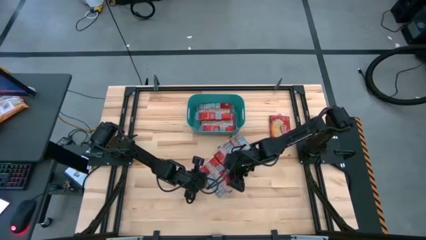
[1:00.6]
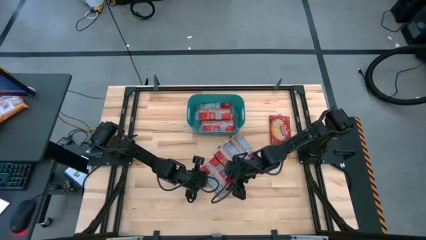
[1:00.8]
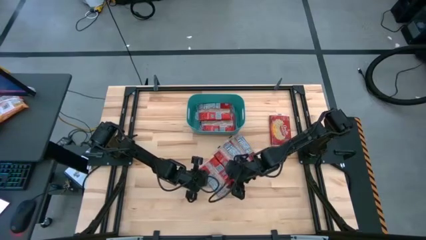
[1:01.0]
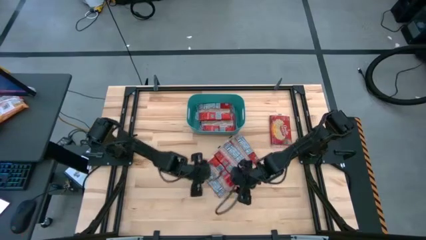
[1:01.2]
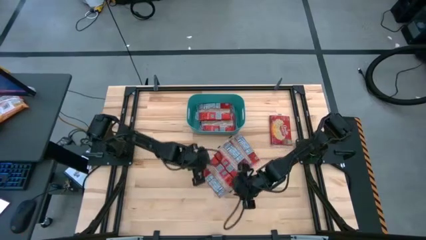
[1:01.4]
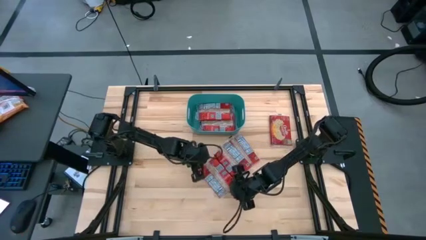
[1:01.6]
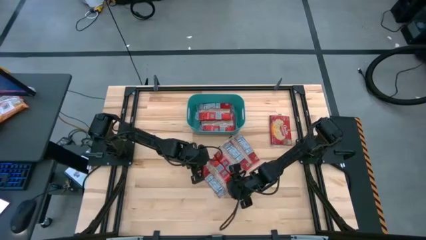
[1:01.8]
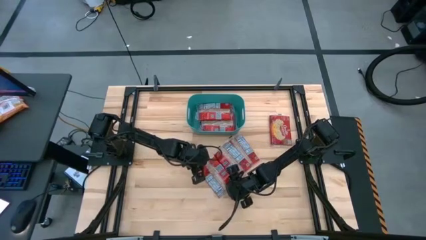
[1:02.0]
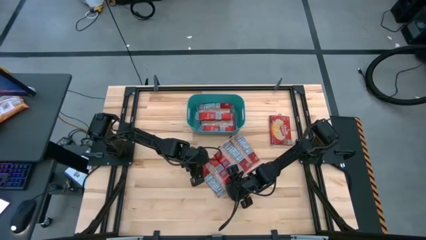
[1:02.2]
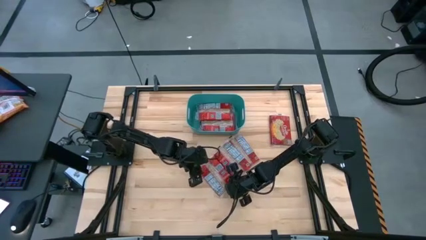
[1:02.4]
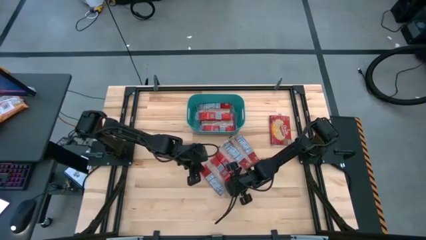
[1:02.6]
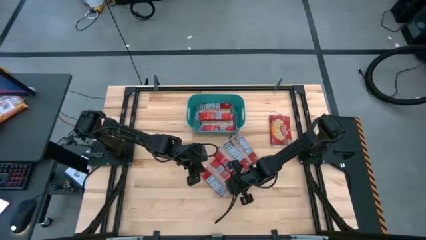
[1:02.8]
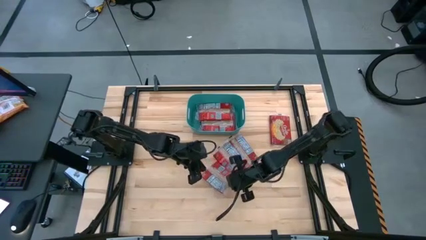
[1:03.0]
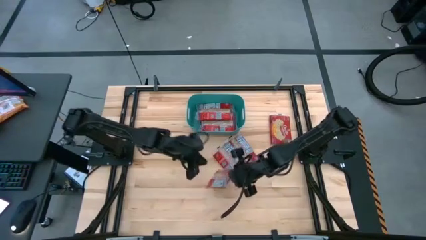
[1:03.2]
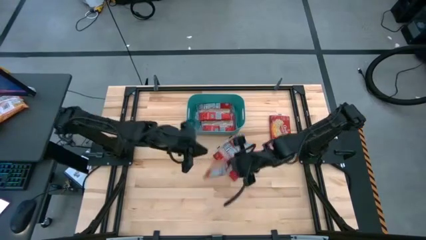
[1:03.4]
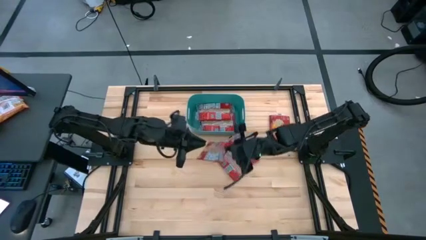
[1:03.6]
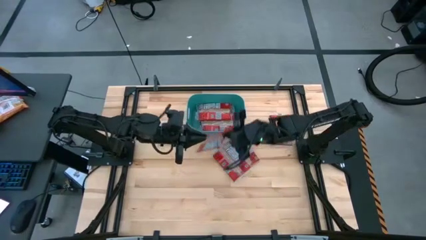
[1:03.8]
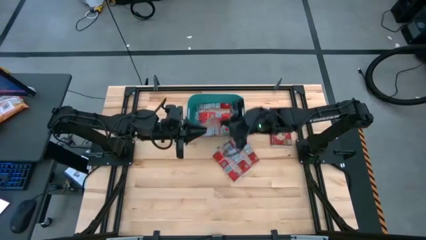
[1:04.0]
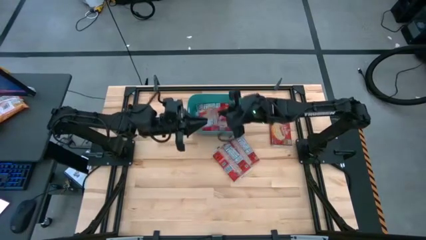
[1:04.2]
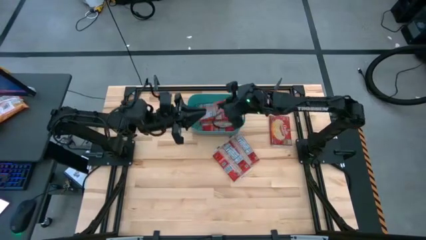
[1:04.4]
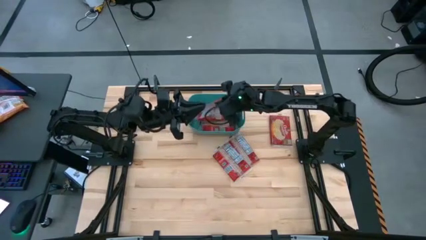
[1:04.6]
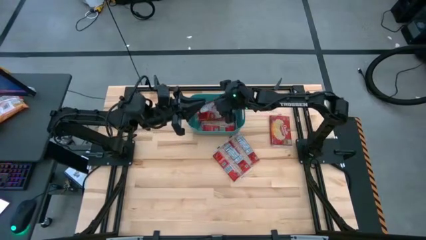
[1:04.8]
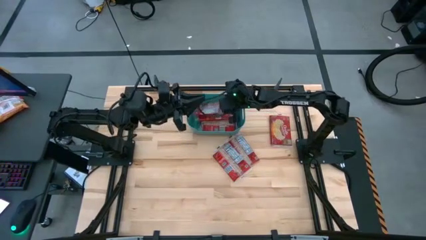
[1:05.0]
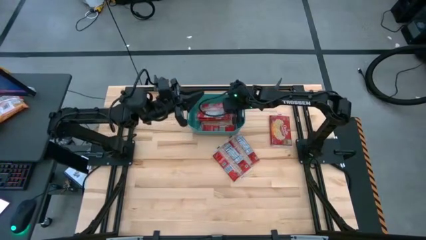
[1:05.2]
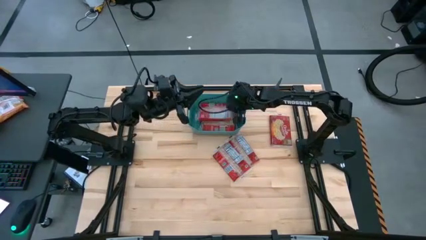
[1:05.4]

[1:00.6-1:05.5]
Task: Sort popcorn bags into baskets
Put the red popcorn bag into the blue bin

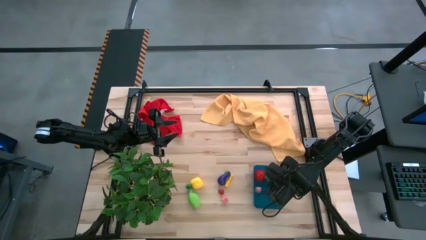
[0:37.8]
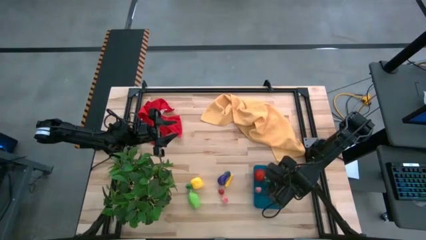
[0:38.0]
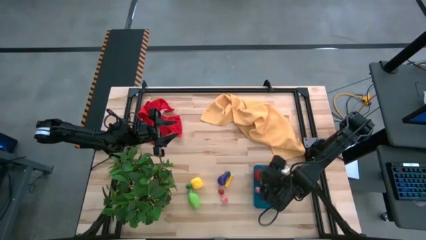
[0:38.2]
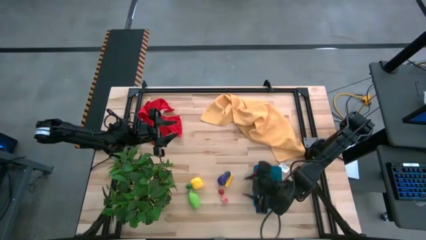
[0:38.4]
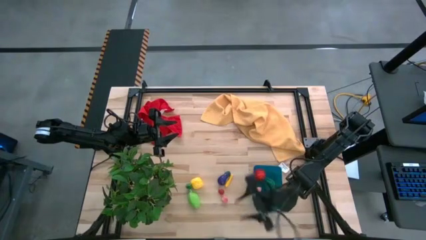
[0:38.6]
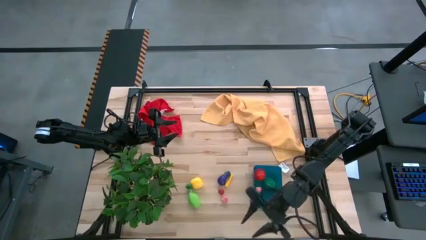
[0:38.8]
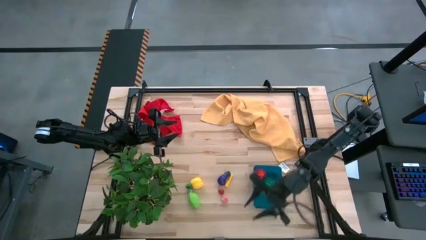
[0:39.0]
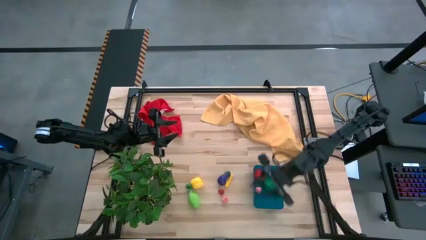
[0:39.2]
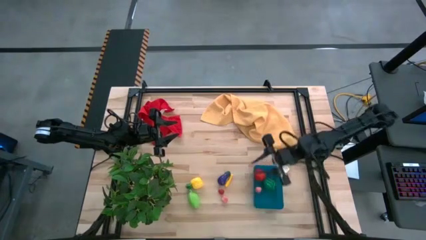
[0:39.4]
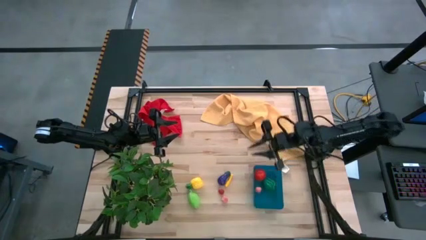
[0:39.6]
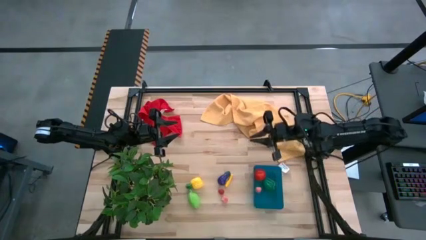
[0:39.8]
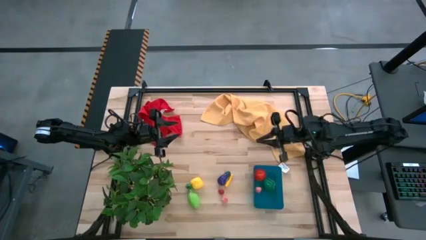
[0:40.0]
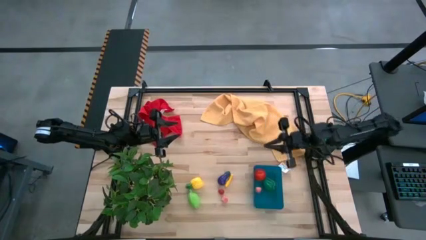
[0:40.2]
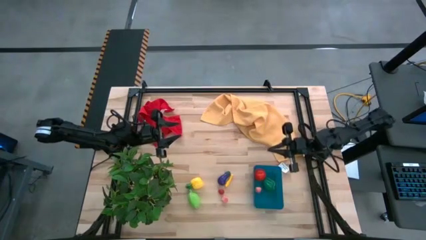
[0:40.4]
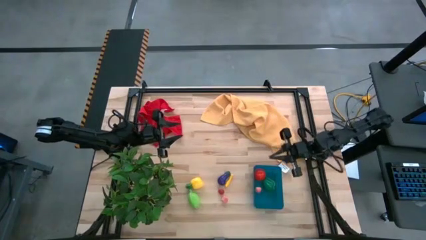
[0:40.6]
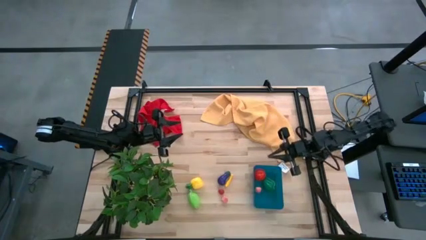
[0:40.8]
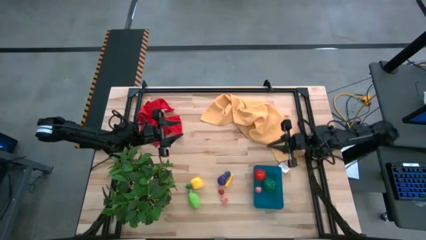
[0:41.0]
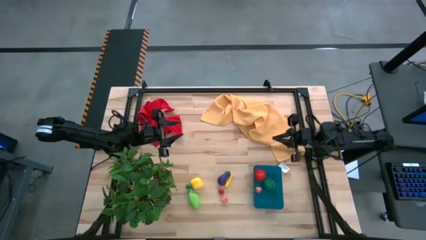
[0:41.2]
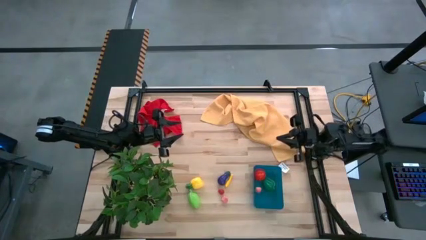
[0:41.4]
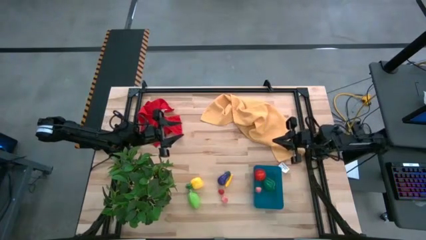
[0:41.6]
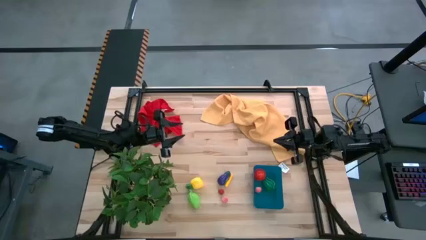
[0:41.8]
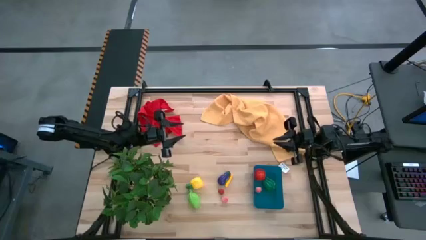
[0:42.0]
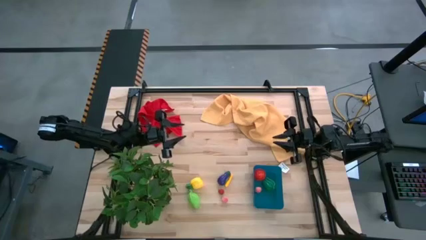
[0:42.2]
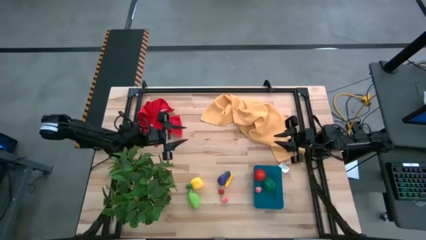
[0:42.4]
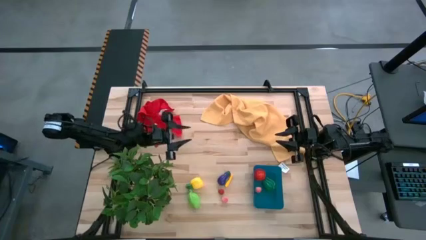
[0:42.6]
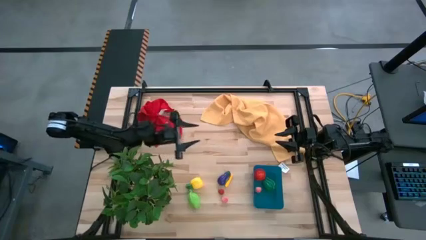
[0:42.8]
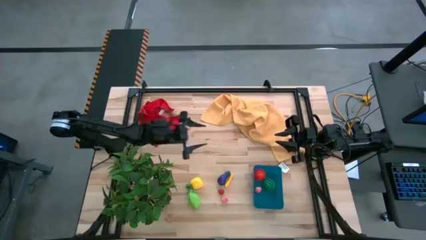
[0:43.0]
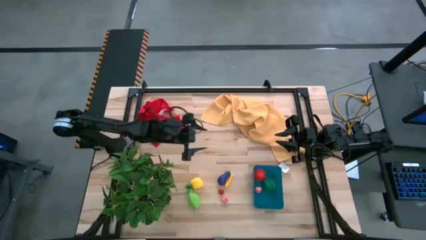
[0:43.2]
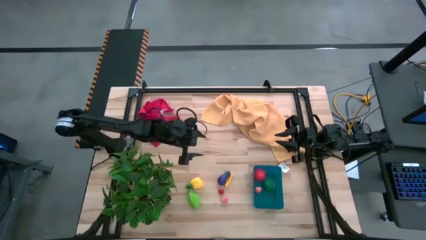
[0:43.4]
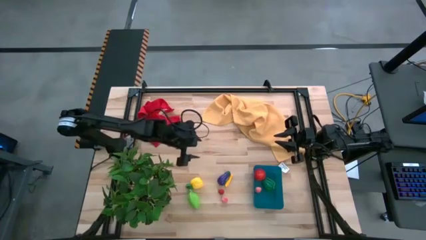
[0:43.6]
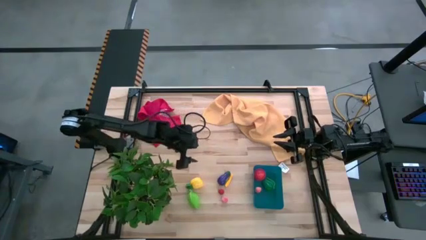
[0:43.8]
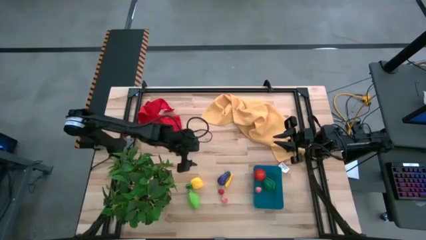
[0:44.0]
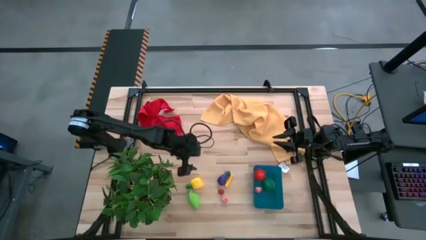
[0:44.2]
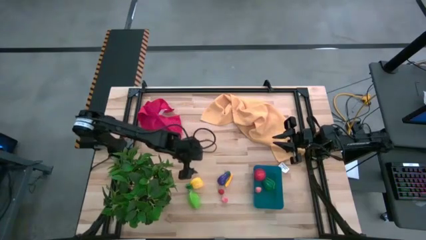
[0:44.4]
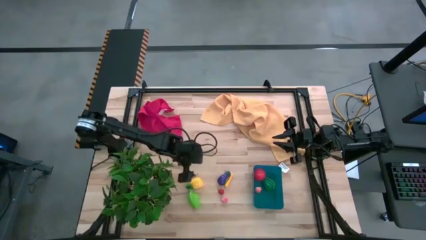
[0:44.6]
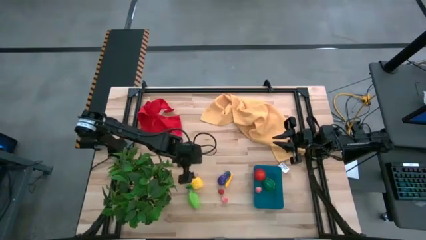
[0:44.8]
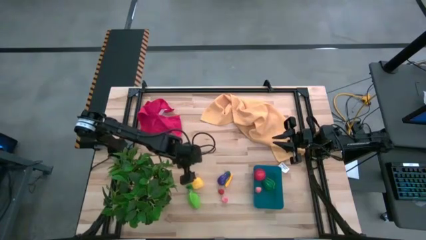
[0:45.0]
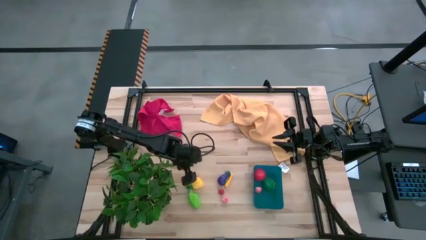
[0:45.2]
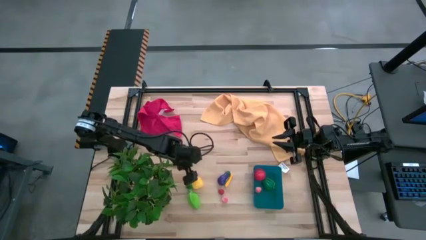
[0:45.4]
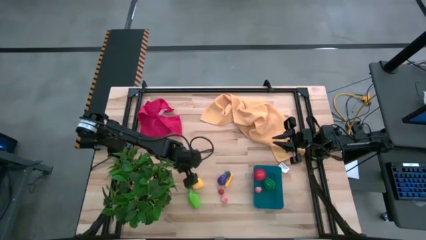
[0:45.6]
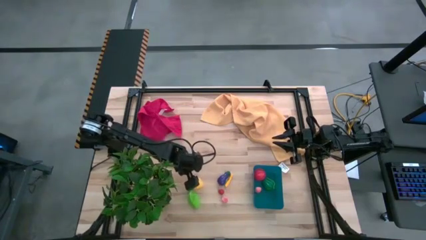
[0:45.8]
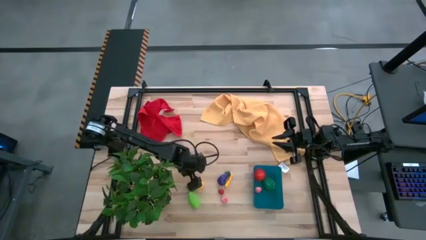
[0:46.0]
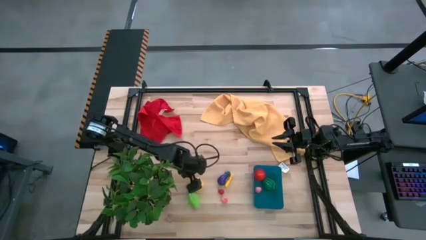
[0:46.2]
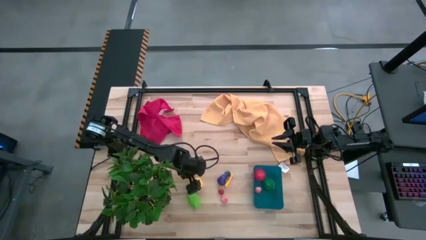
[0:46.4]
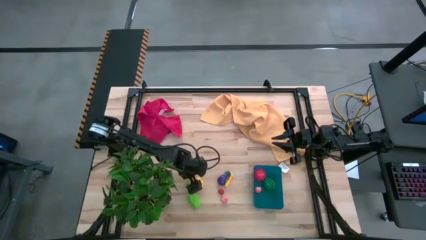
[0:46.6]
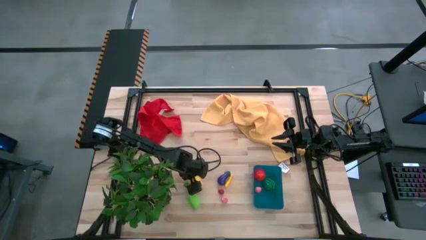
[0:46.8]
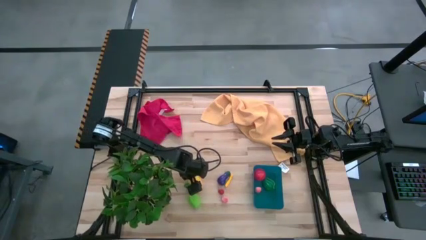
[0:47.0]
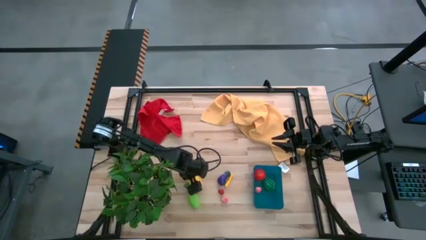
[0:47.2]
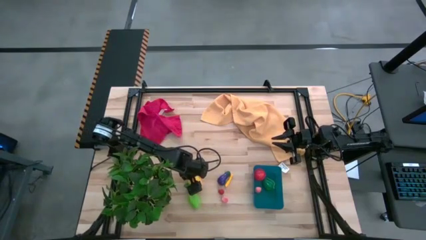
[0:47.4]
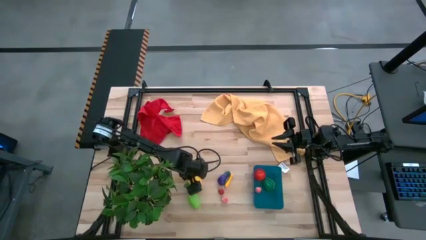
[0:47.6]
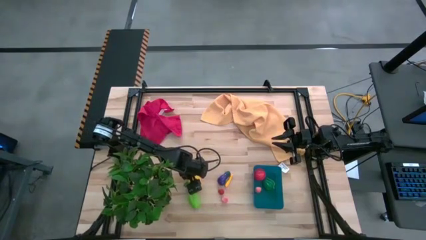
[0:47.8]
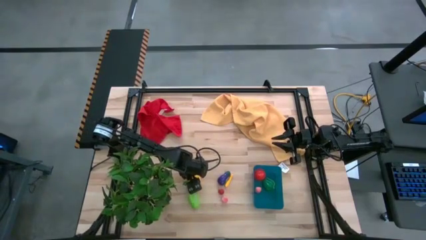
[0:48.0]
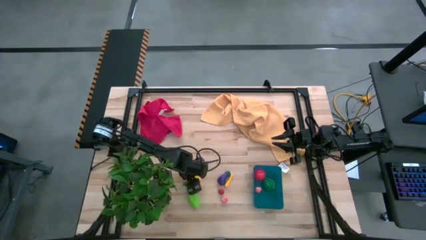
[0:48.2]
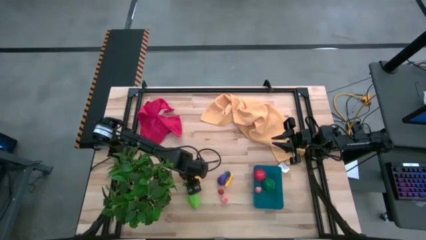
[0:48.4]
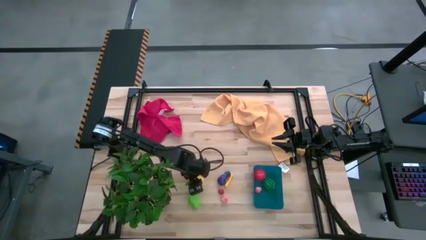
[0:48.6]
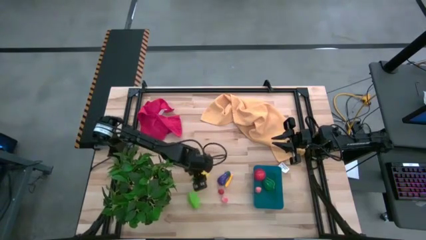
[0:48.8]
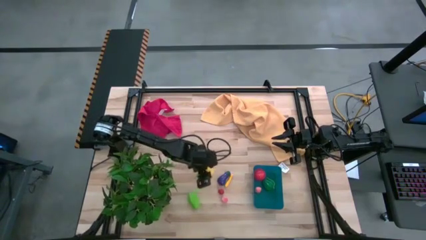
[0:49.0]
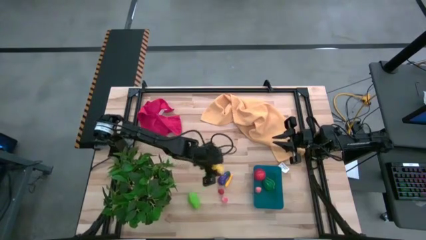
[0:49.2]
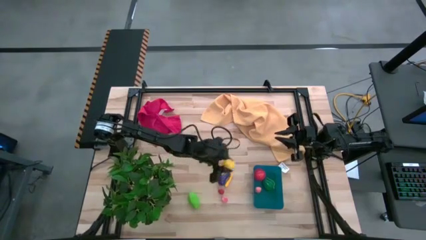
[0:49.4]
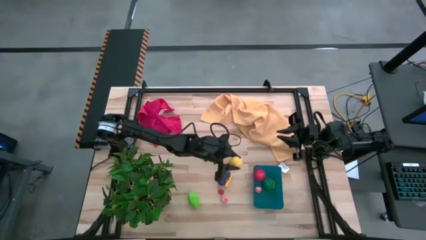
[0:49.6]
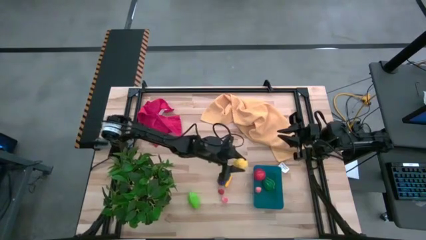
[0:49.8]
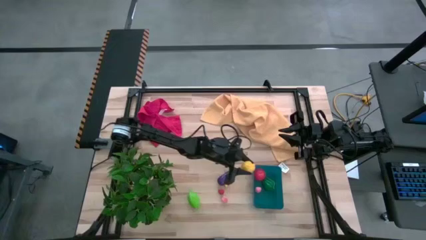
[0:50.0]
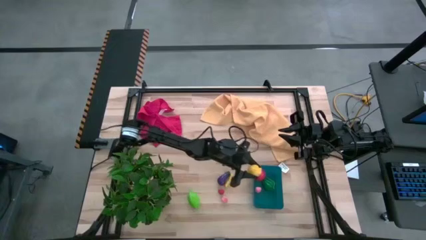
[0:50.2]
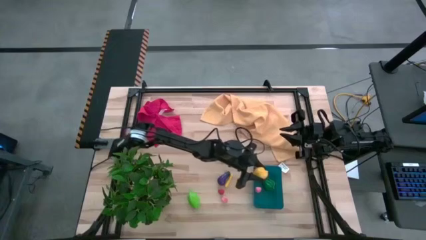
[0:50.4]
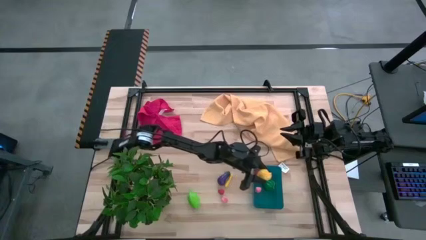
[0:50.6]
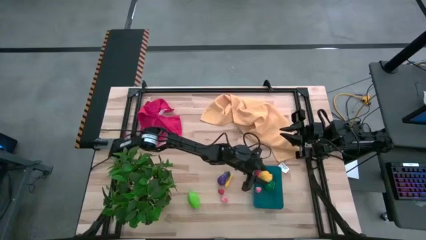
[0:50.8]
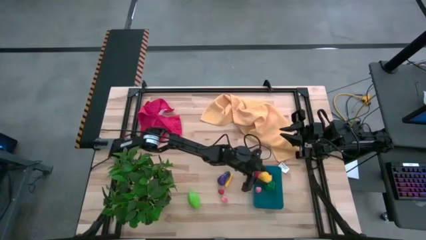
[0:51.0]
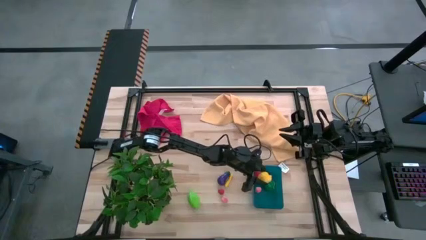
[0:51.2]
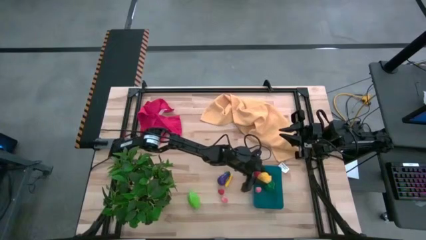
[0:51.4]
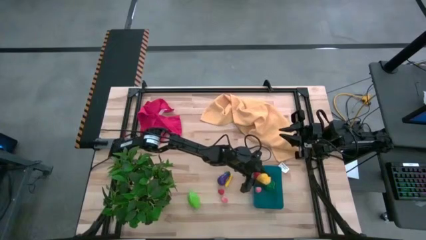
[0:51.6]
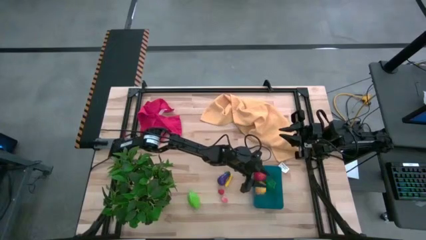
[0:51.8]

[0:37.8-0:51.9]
Task: Pick and placing Produce into tupperware
Put the yellow pineapple into the blue bin
